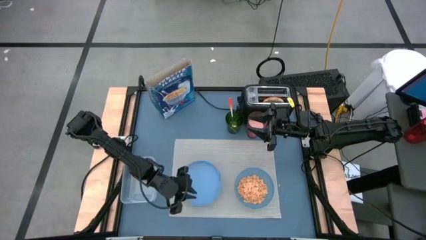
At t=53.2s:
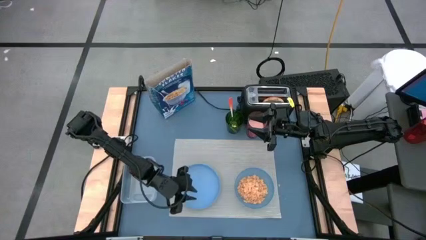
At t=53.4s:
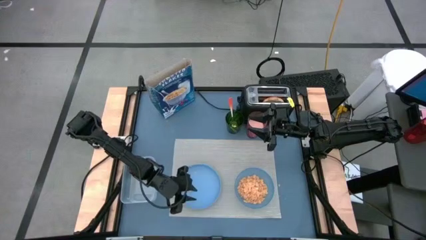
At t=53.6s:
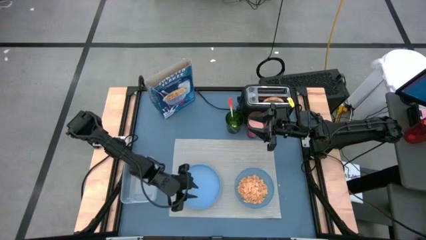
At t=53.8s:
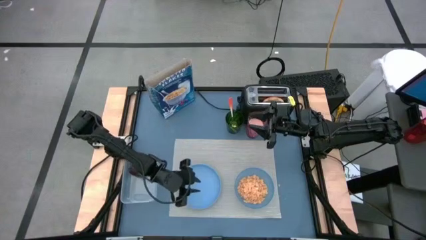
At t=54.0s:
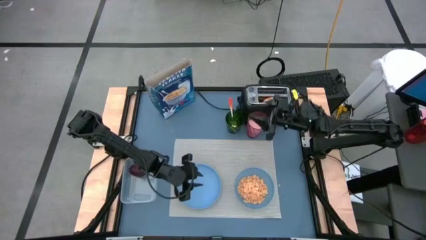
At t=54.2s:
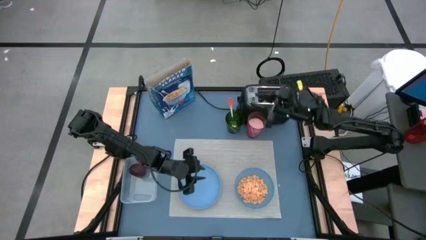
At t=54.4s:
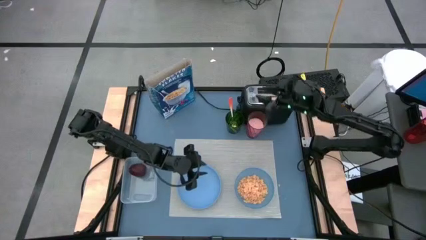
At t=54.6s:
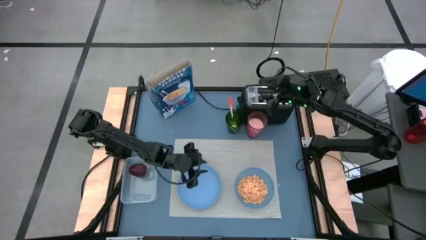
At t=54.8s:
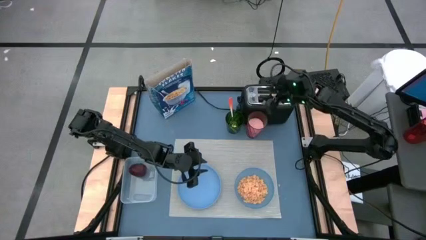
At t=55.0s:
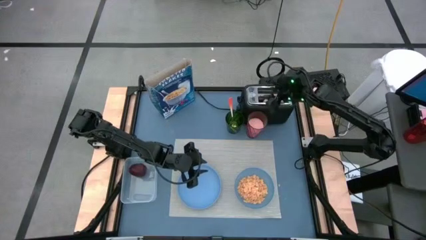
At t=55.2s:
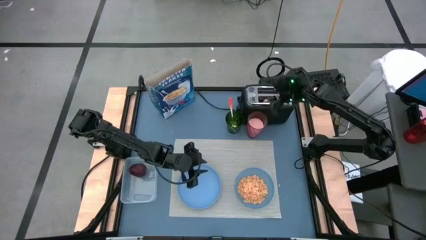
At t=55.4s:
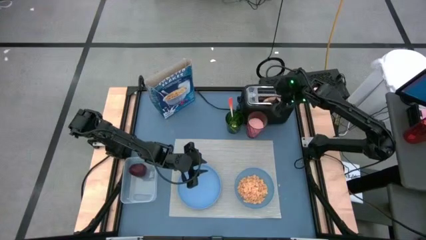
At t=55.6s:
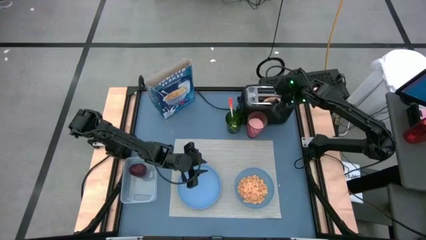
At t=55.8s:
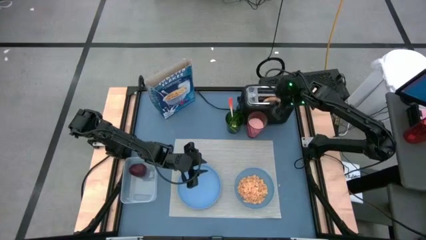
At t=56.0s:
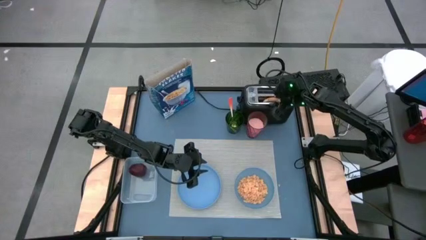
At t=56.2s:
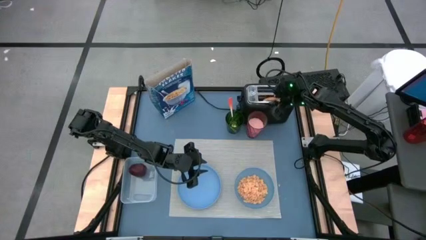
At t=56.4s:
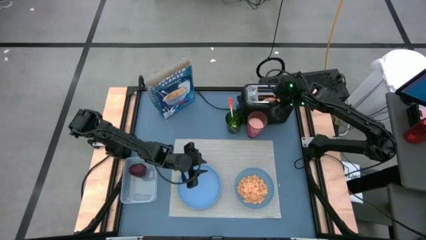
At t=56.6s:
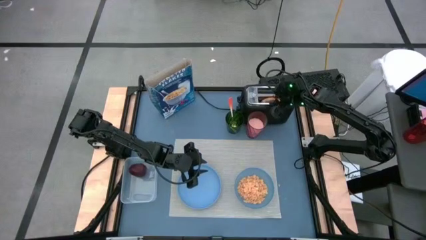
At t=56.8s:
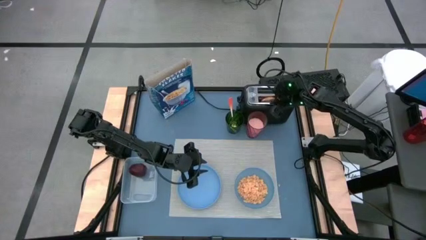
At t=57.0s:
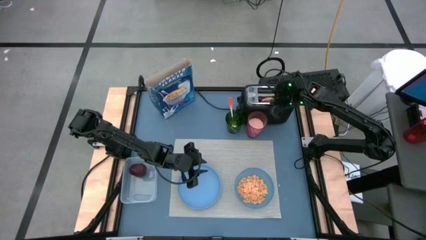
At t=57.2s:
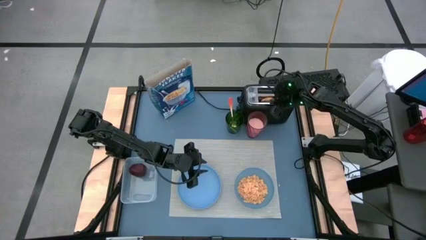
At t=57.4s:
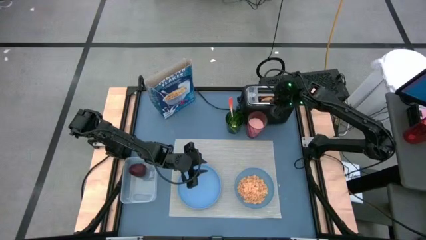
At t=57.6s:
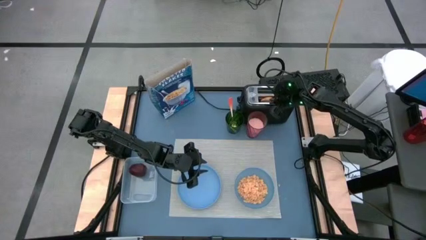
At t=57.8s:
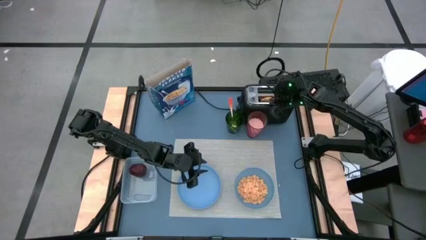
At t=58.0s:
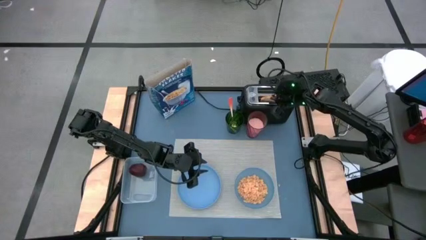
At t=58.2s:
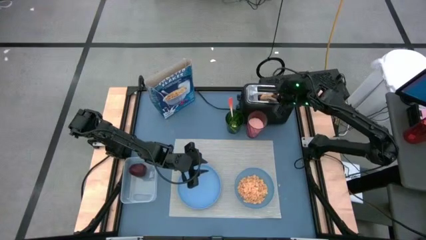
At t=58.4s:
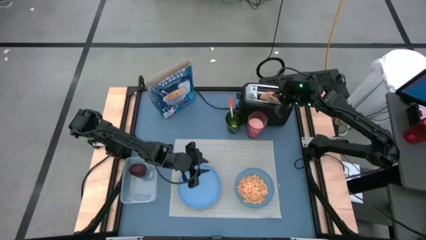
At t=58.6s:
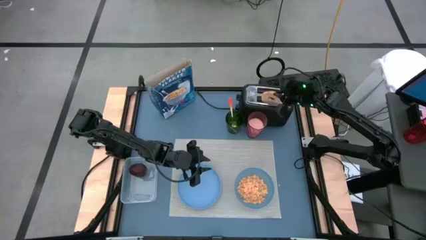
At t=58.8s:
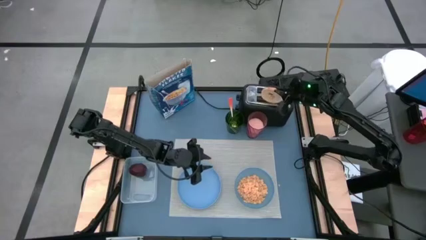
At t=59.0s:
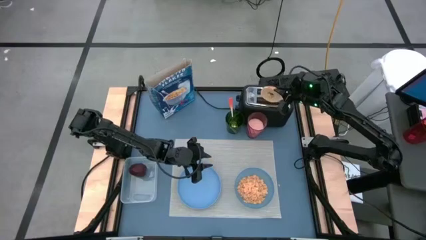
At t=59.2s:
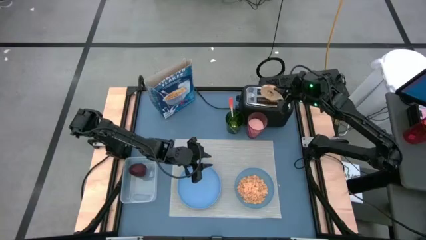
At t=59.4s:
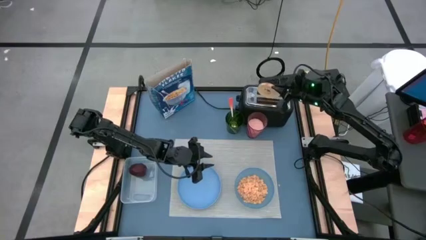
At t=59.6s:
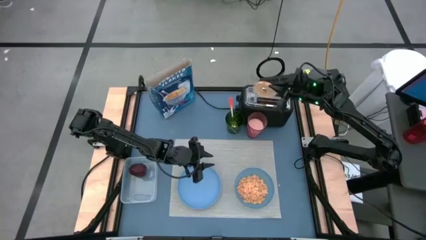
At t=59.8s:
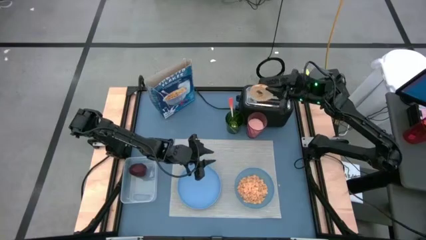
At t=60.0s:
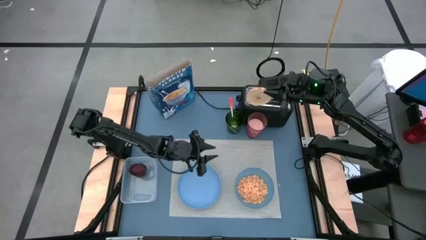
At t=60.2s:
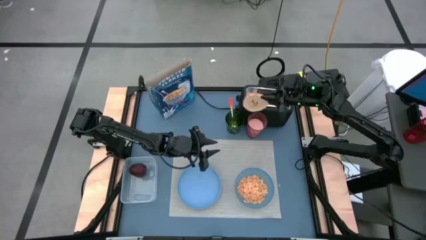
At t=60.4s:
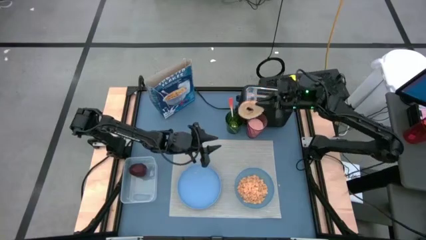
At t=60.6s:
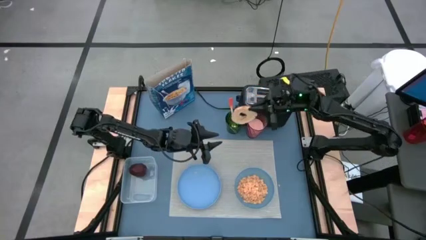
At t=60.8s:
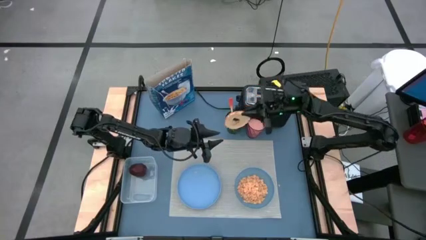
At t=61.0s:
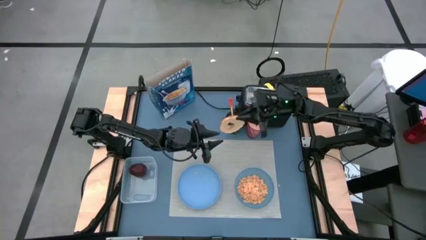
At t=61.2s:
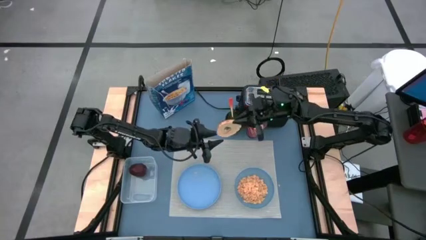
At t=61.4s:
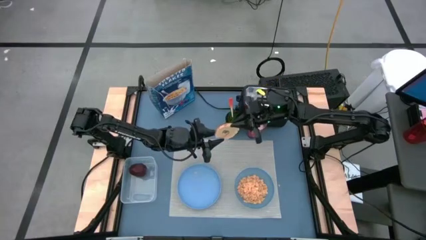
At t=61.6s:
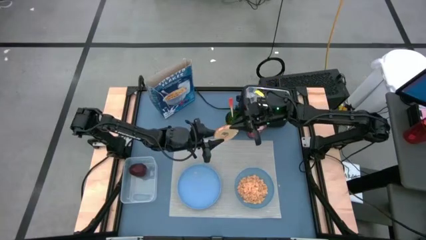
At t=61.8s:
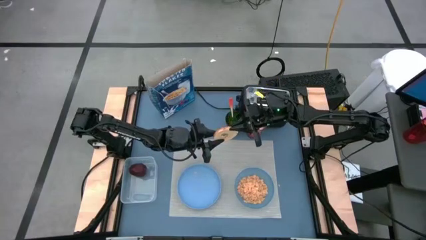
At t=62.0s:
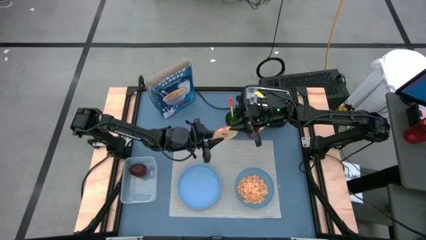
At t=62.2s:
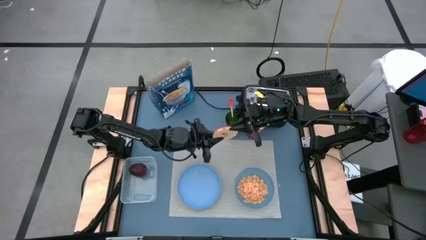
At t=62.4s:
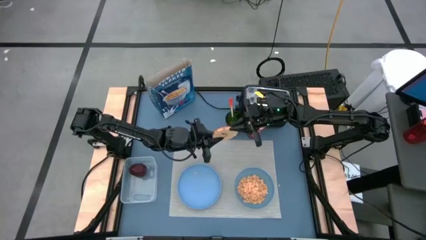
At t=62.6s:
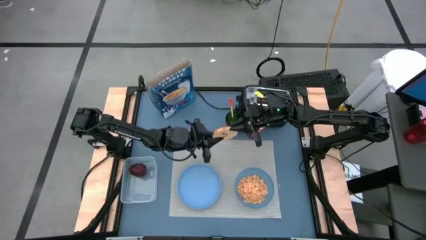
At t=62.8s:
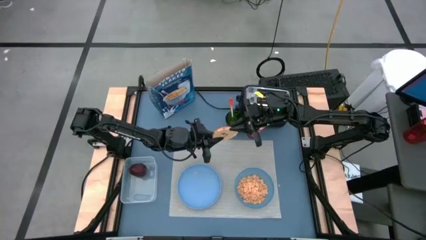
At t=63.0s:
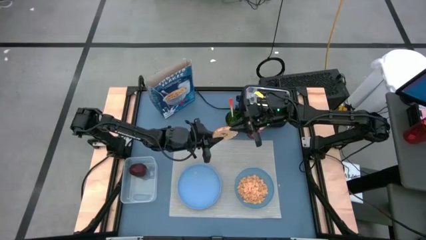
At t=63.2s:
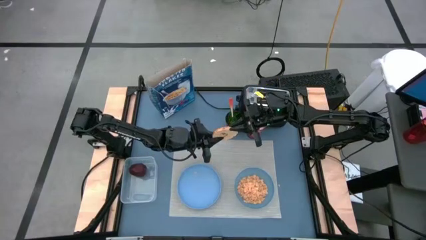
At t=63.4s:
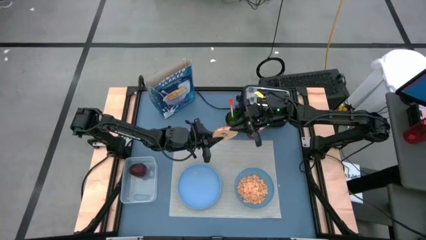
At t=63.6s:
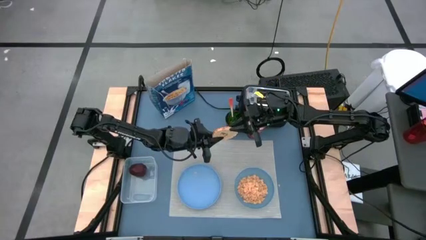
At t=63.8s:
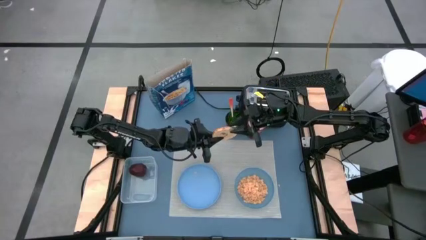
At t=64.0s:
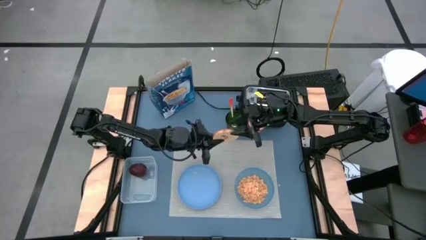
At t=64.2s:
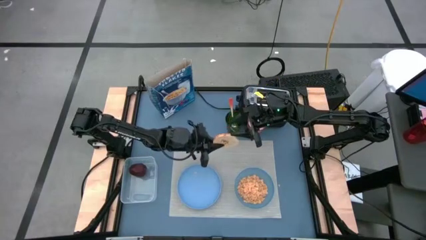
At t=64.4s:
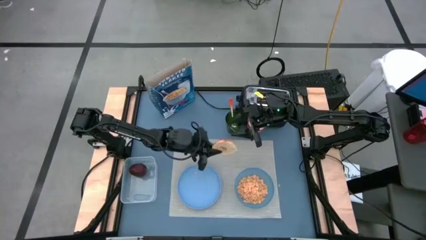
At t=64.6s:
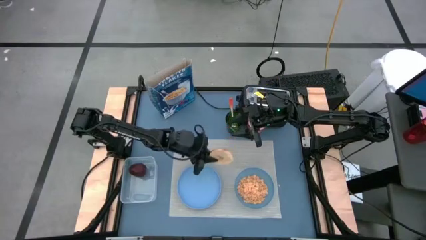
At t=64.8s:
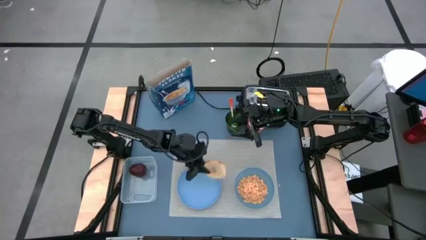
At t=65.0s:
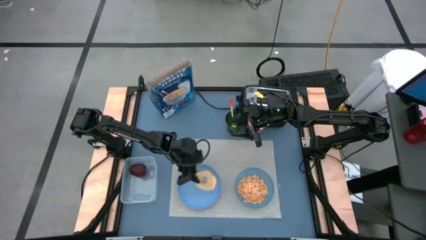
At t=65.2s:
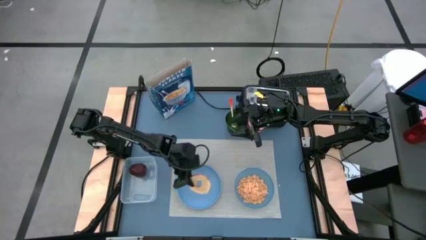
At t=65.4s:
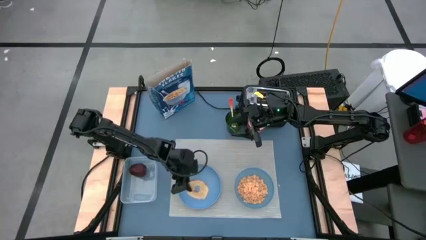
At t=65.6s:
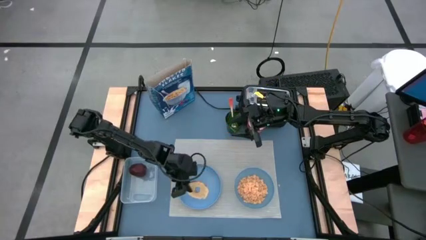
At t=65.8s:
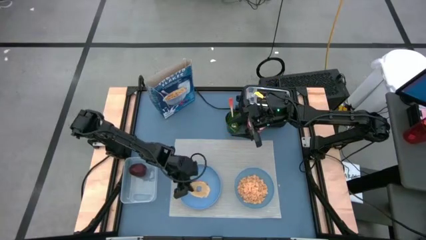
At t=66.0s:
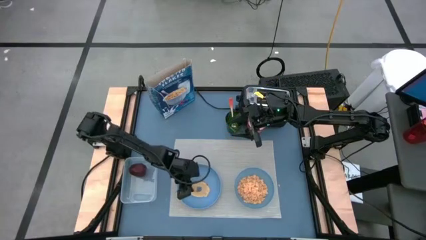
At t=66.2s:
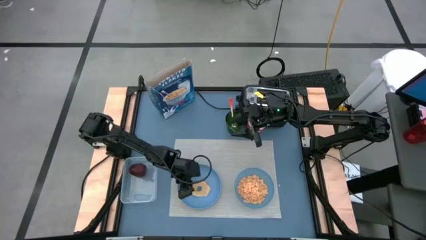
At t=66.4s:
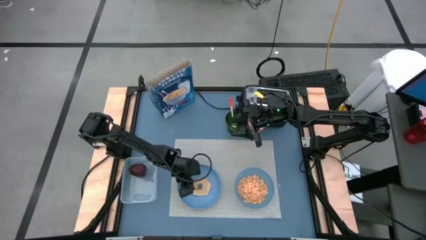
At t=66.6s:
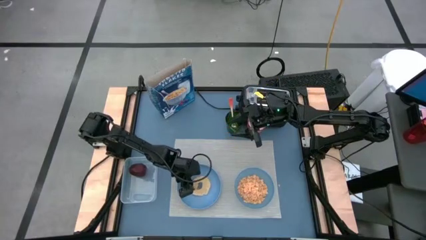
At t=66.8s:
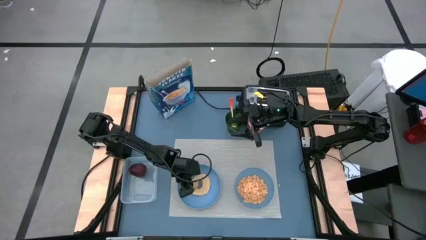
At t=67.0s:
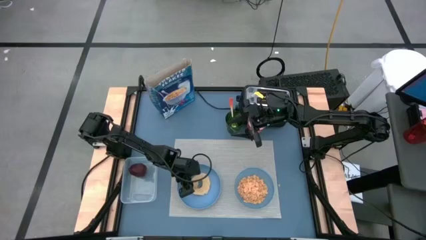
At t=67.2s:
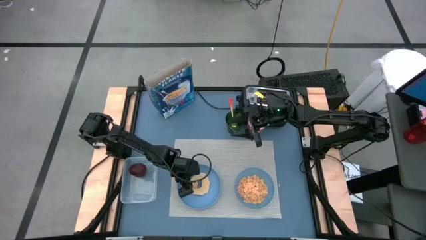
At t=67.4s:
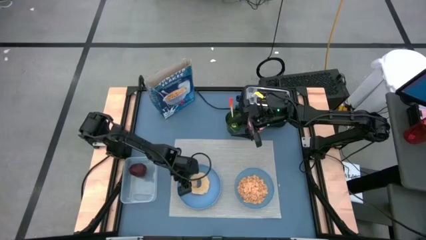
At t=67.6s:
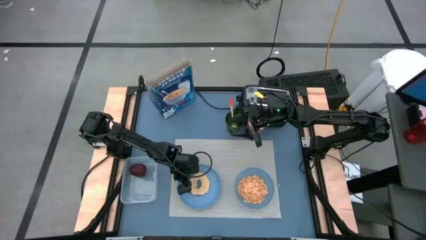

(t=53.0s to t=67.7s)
Task: Arrange a breakfast setting
Put the bagel on top of the blue plate
